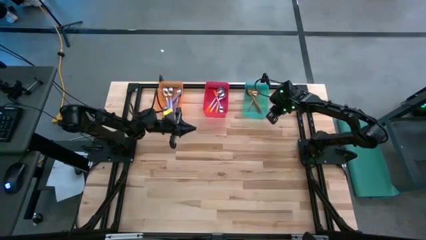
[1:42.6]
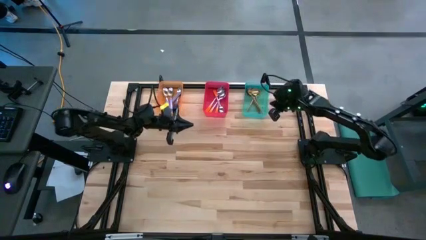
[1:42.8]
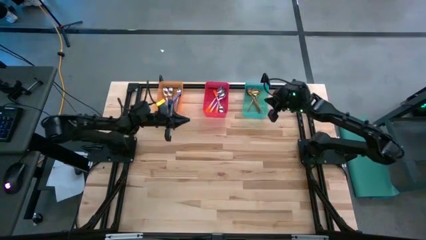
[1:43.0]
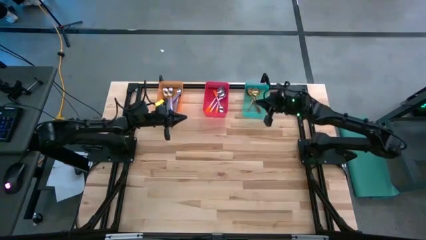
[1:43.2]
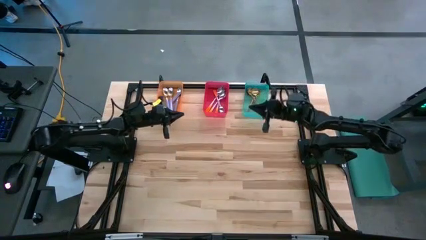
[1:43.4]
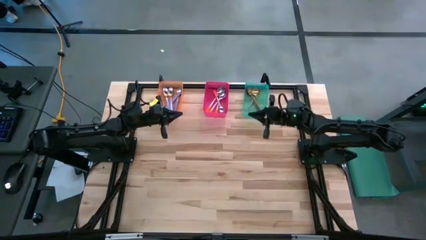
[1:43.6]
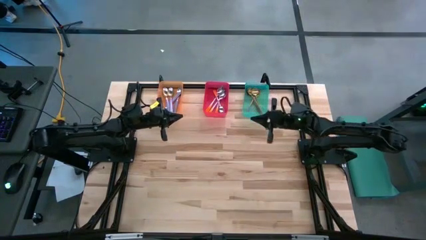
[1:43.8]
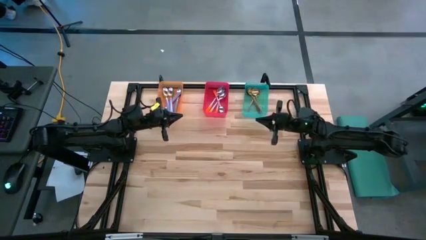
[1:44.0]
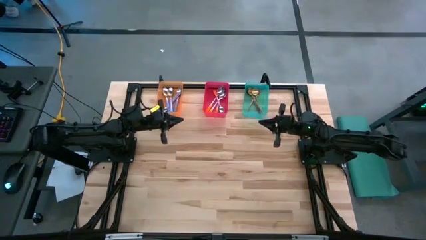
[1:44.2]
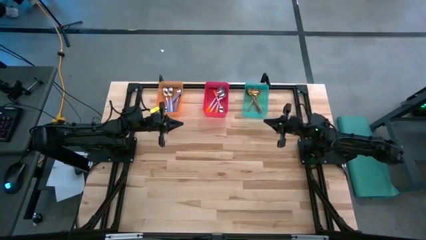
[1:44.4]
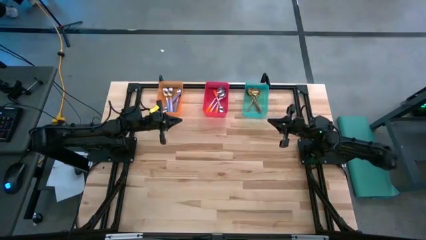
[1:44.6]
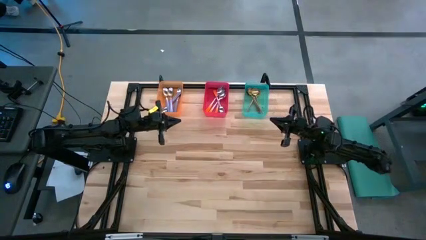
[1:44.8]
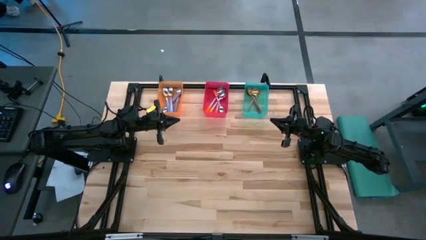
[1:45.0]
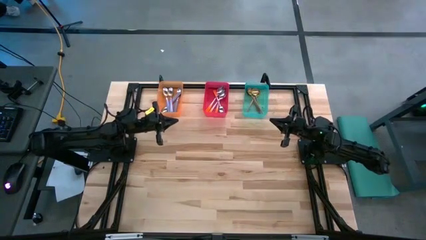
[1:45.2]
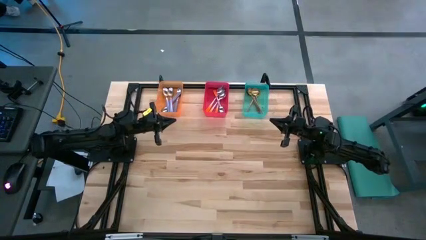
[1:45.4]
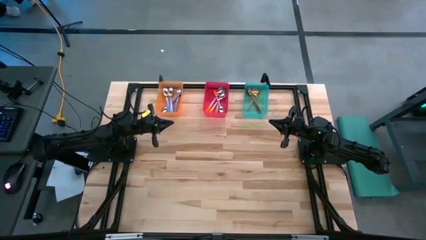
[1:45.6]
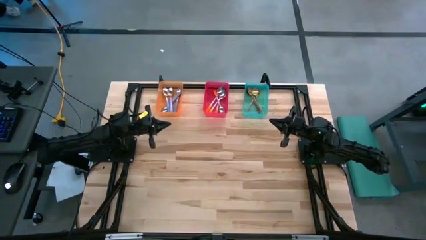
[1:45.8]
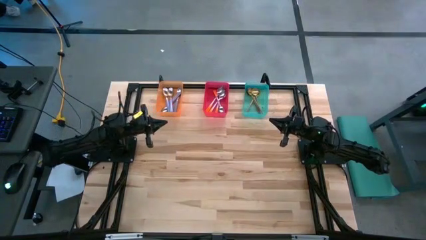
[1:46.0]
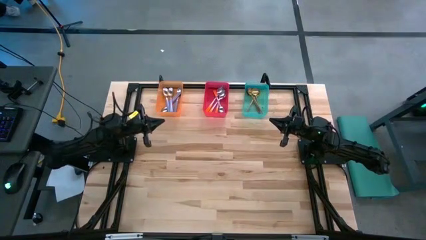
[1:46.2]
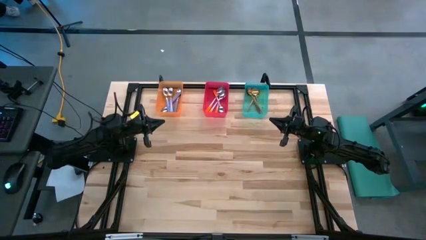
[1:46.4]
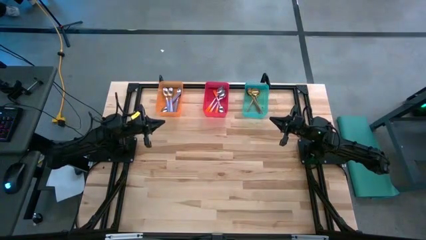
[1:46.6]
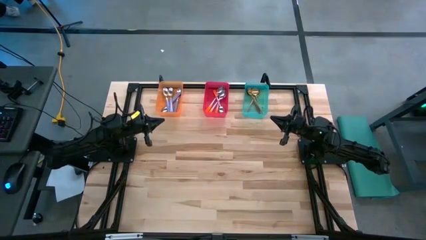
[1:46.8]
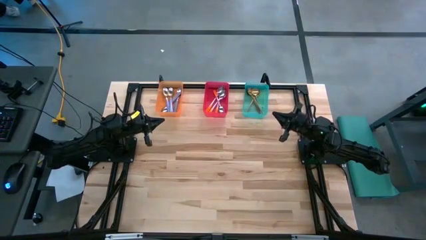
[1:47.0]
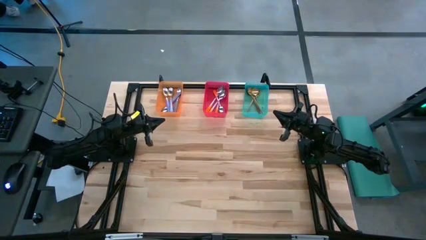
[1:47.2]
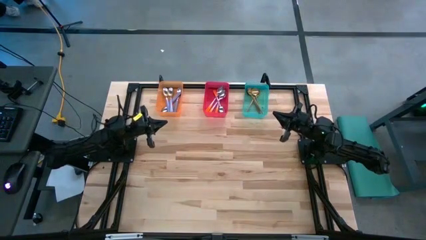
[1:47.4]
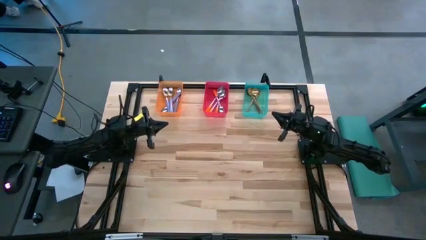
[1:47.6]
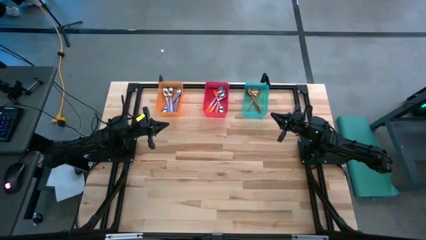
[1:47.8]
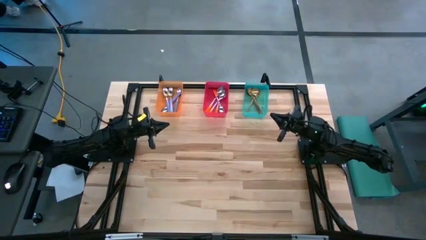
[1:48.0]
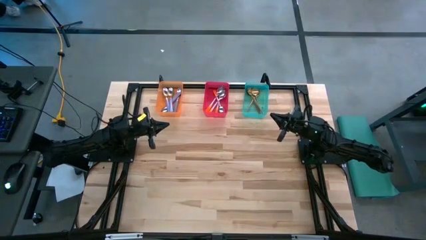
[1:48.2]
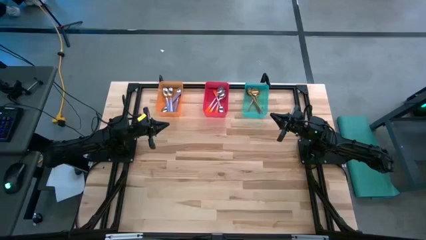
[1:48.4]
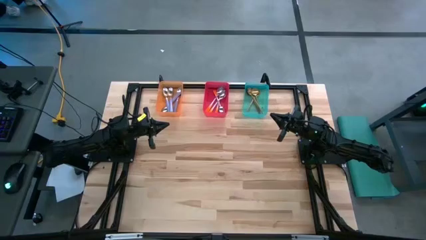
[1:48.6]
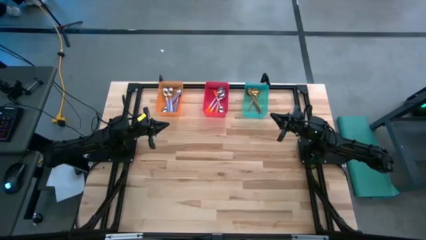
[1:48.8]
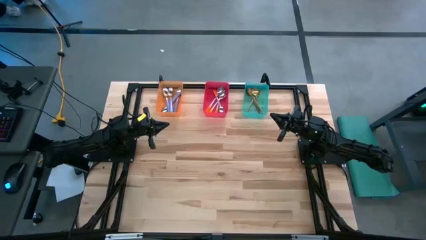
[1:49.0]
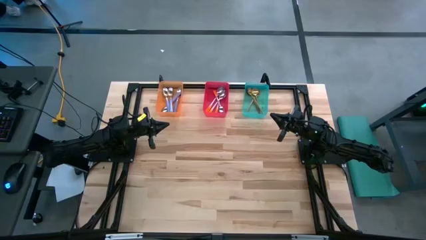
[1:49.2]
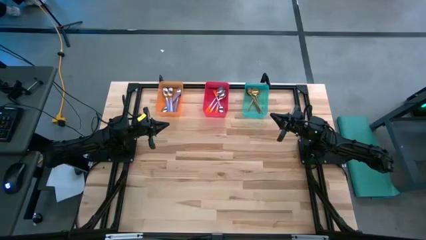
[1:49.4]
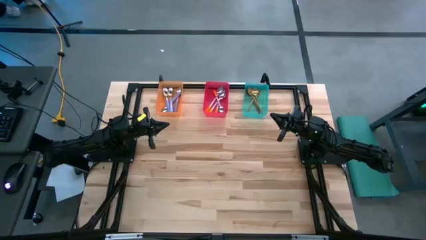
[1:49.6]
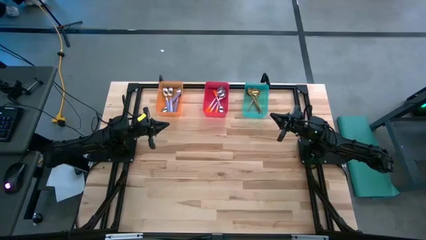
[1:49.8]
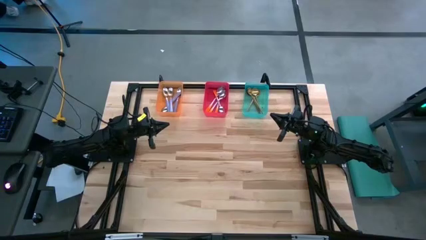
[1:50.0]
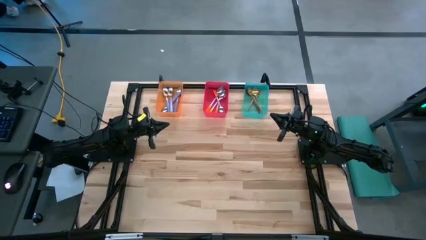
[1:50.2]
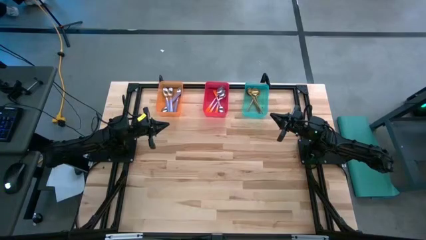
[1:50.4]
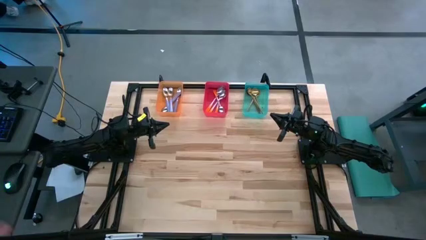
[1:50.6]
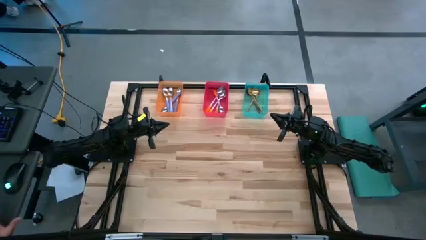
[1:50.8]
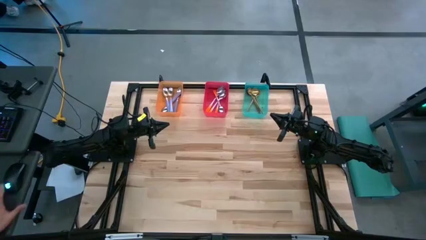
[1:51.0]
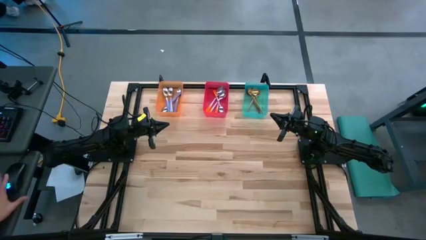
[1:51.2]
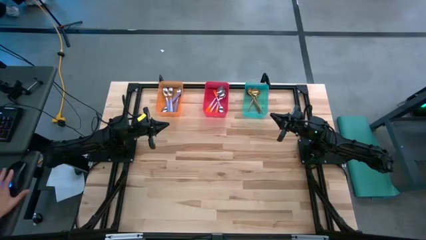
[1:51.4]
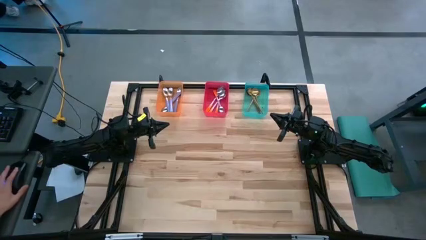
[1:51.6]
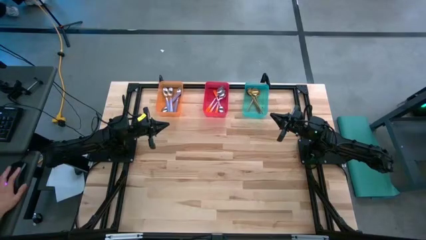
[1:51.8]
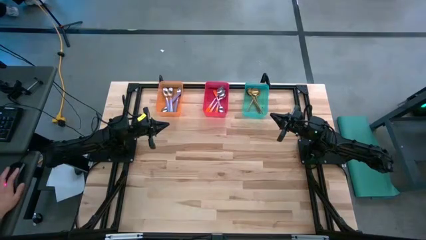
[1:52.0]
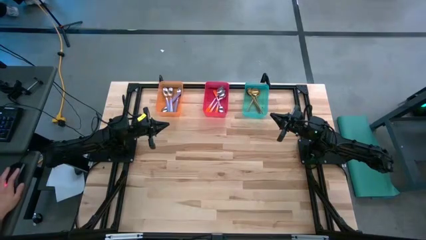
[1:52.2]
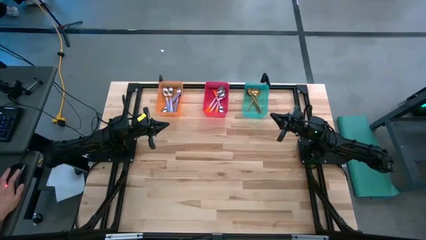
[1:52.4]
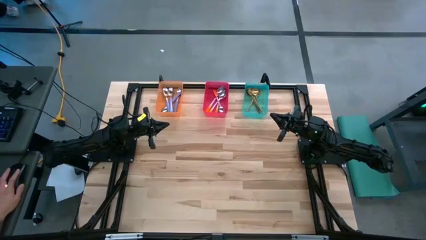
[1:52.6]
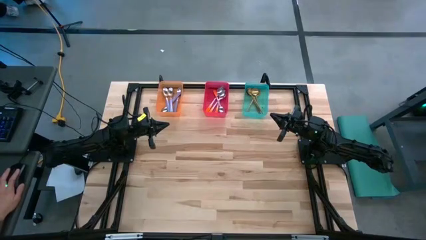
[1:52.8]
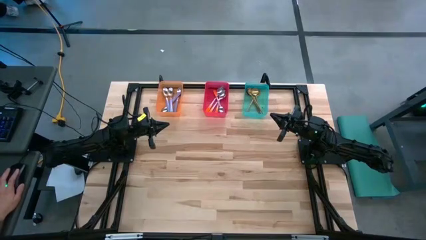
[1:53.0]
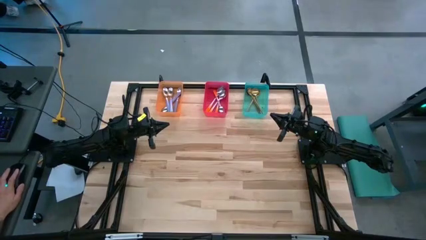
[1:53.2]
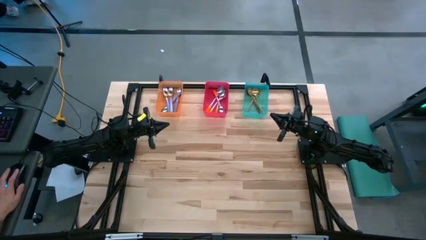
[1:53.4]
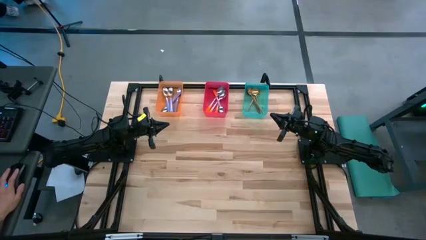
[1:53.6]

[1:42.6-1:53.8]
Task: Sort silverware by color (type)
Return to Home Position

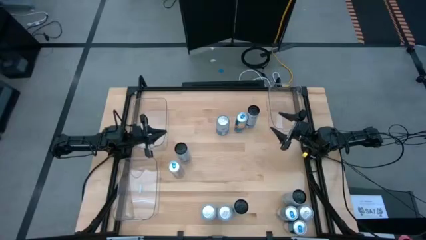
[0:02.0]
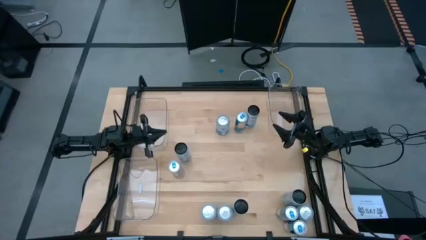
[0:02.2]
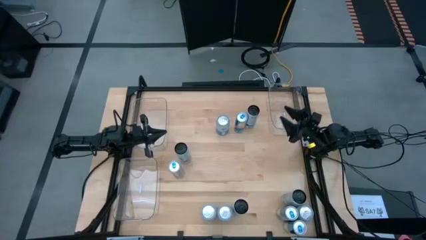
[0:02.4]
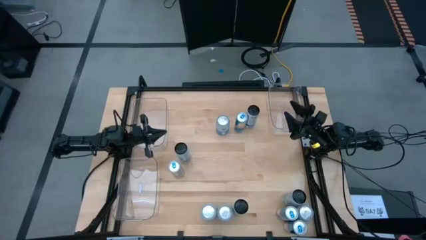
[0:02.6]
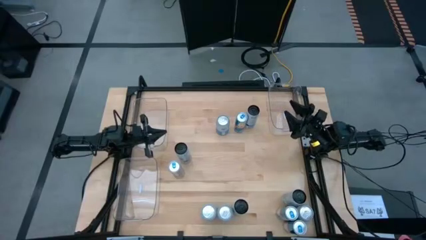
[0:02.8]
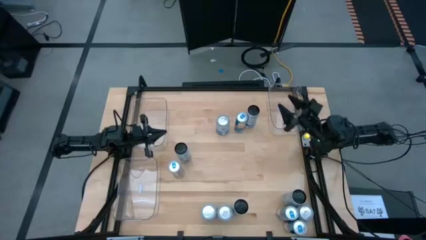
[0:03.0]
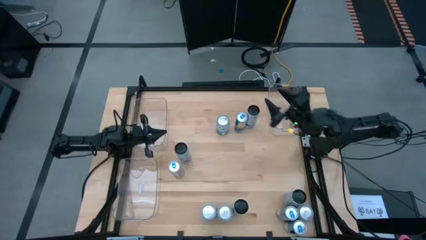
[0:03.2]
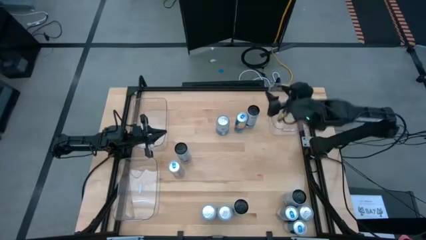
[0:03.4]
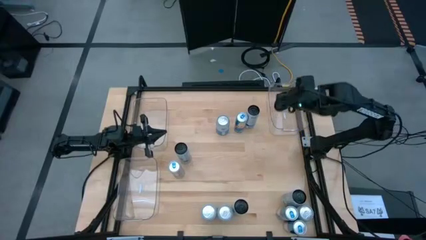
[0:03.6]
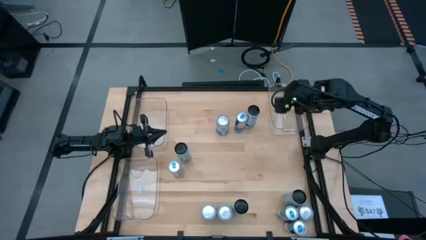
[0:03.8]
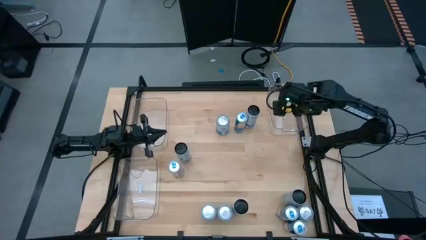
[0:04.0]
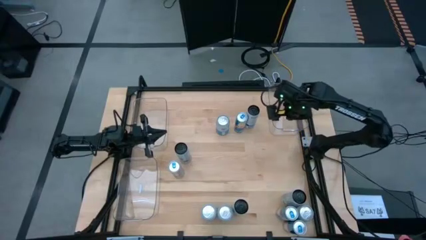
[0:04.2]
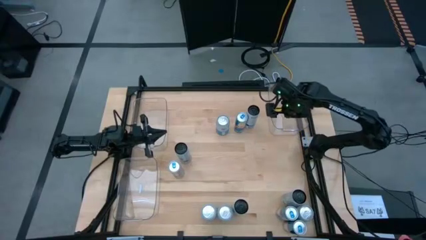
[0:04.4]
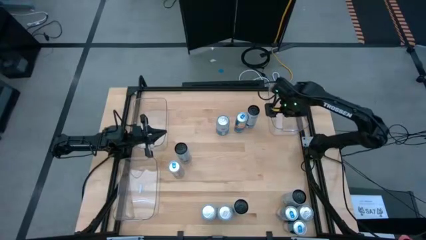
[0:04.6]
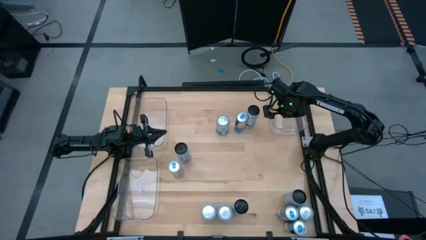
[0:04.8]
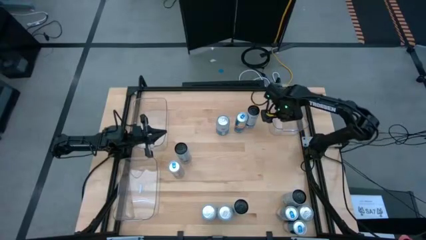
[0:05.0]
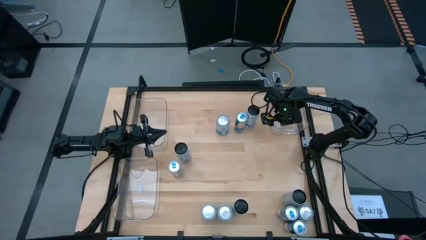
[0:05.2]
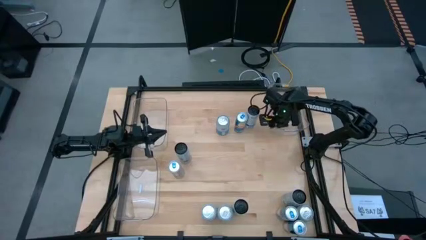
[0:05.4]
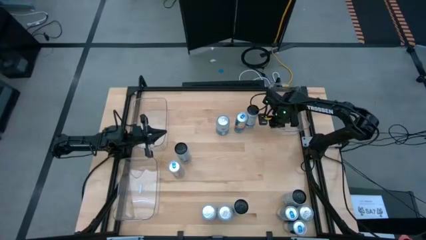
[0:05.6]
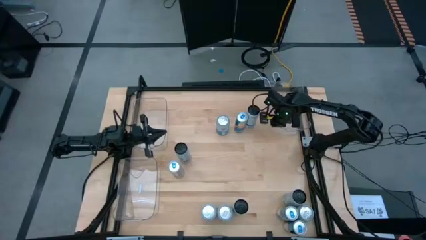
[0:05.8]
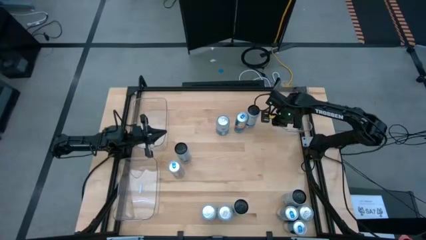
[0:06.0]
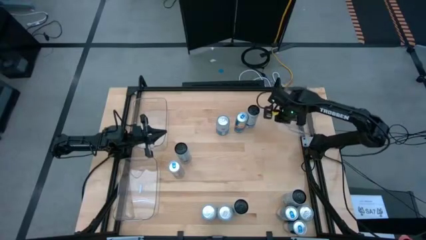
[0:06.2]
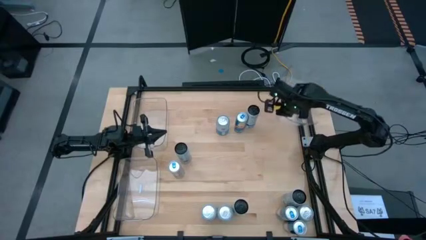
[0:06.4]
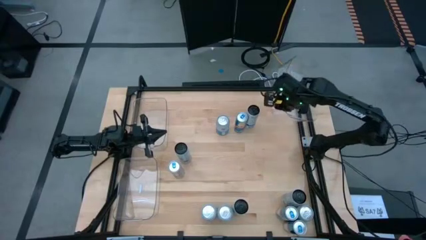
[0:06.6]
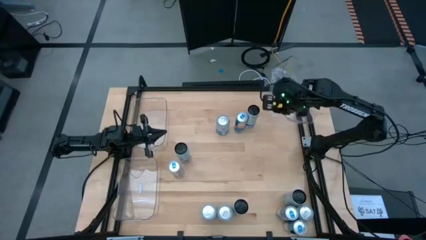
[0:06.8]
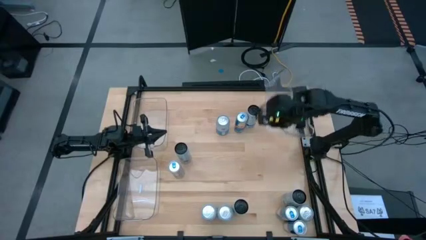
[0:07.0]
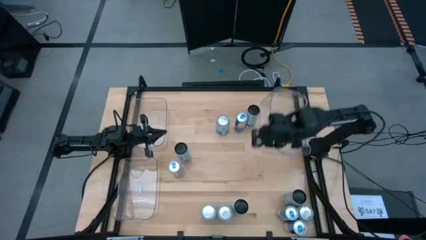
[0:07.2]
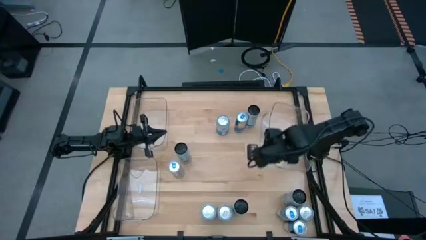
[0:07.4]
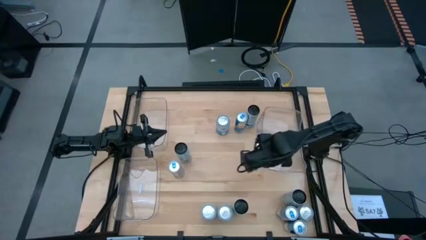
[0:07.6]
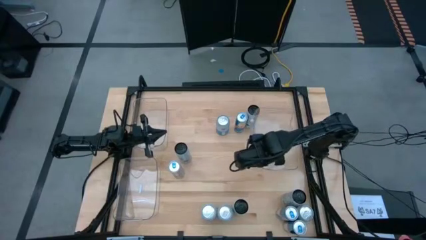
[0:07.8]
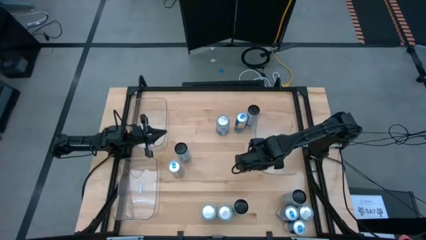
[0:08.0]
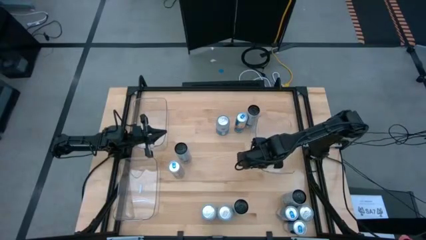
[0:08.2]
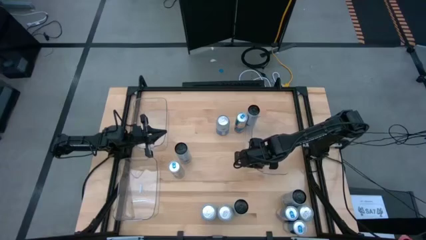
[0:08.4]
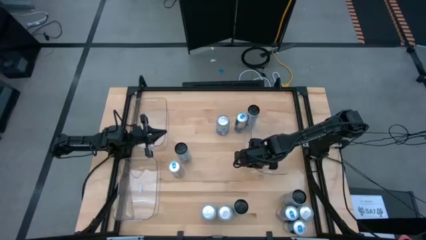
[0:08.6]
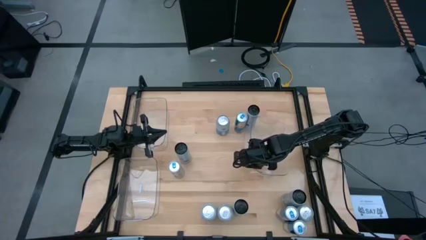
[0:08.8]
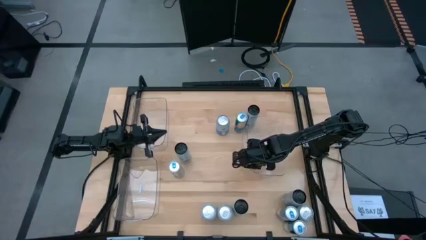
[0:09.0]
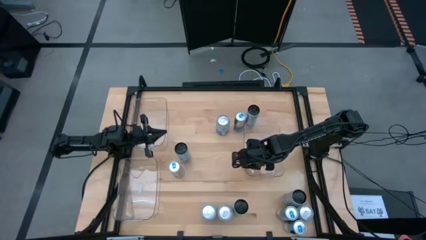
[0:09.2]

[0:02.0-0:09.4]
Task: Sort soda cans
Move the top right transparent bin to the center of the table
